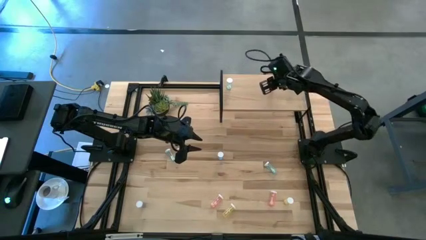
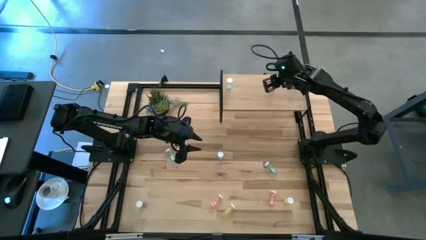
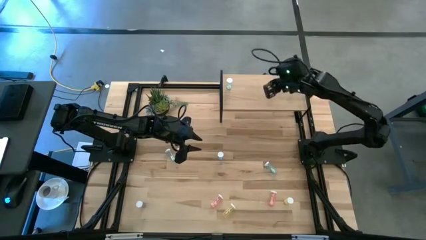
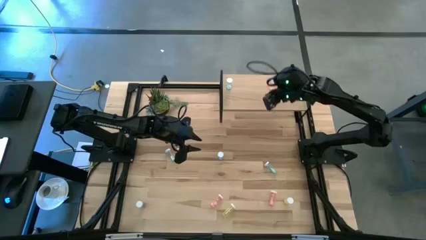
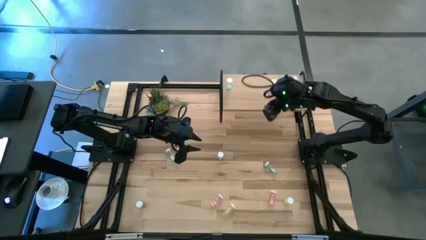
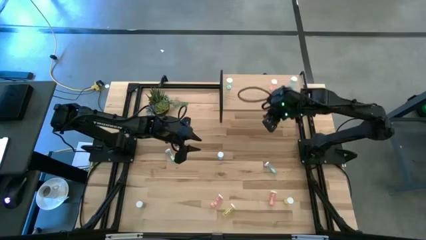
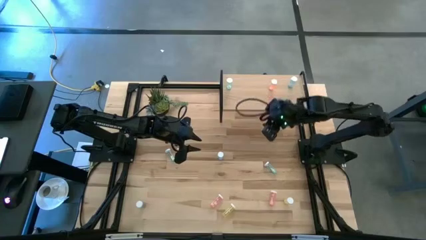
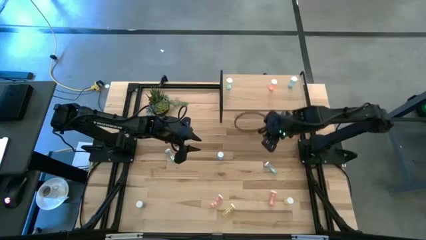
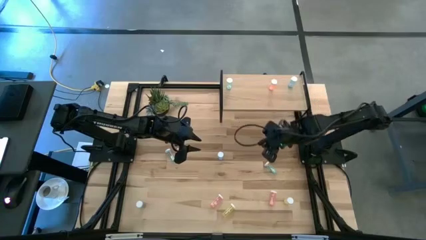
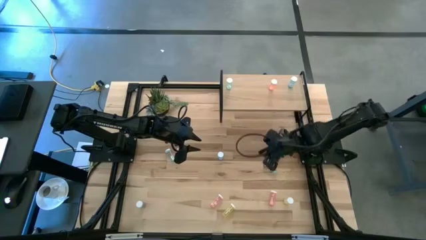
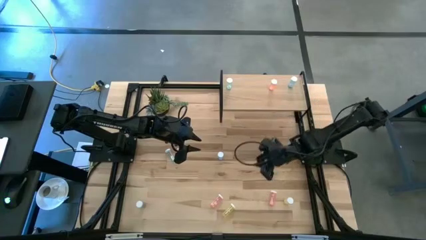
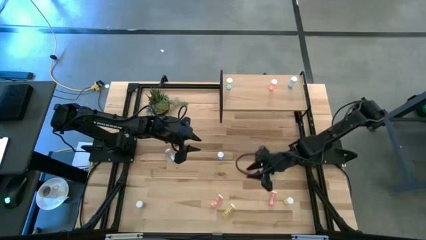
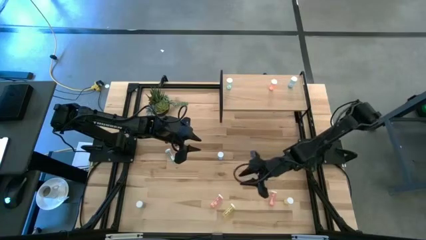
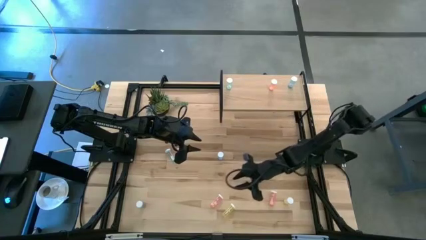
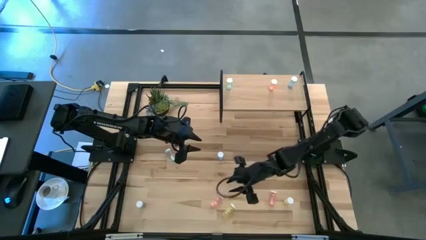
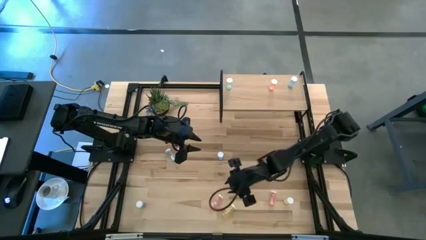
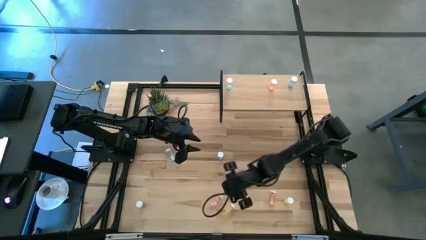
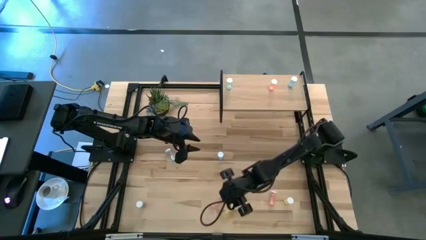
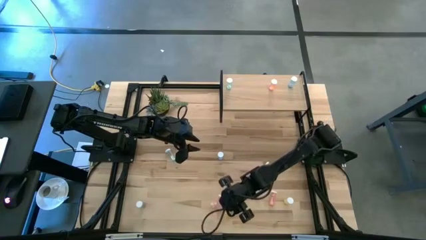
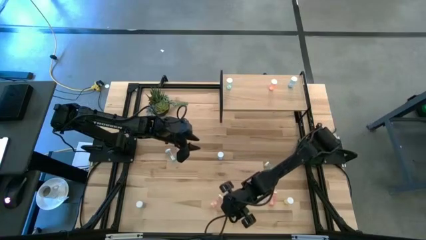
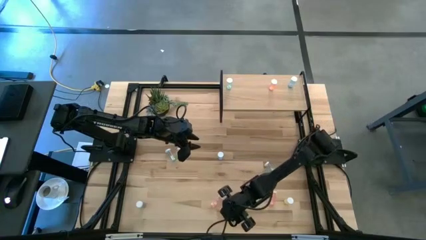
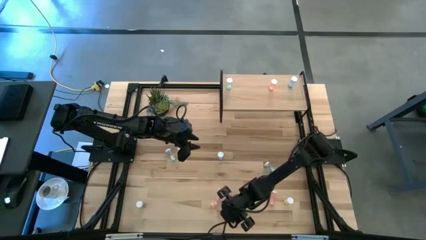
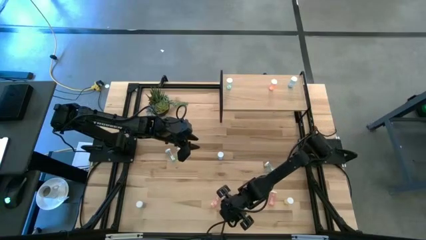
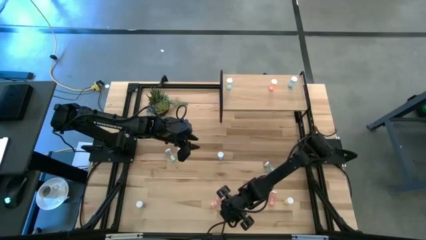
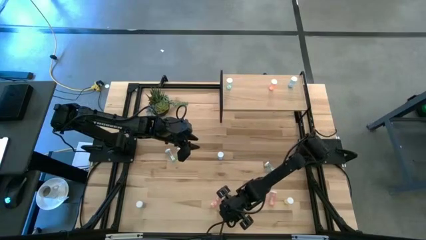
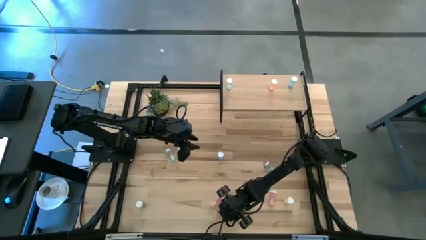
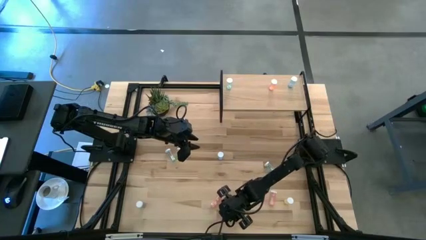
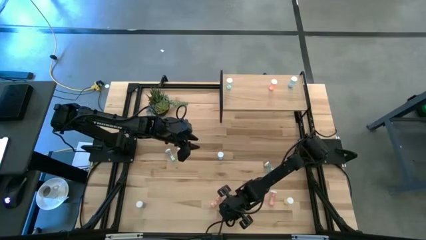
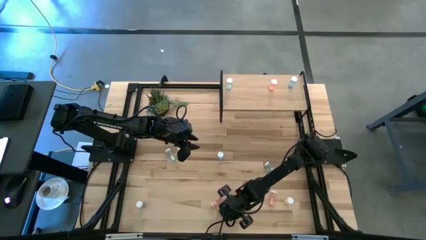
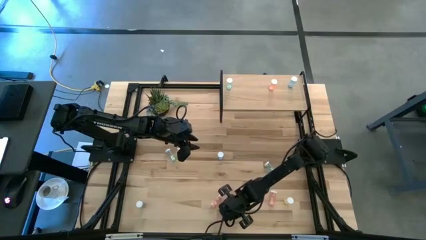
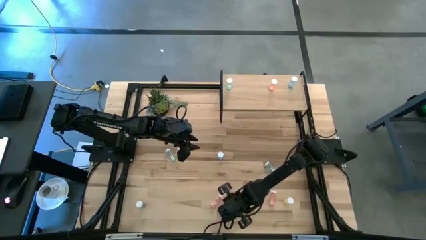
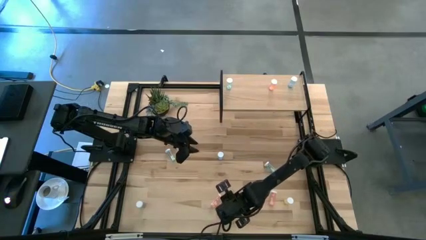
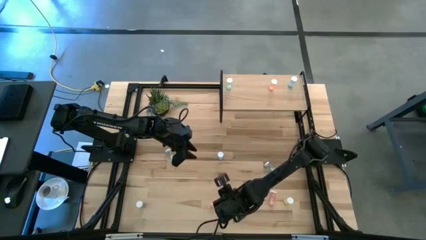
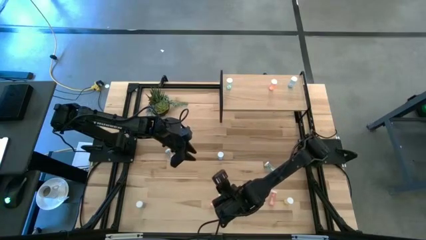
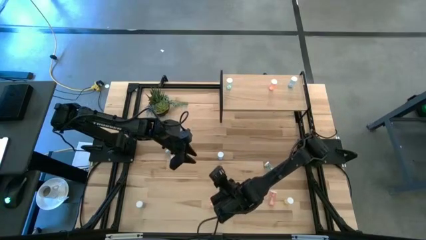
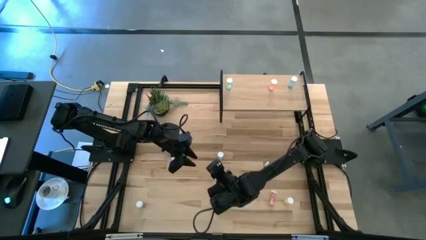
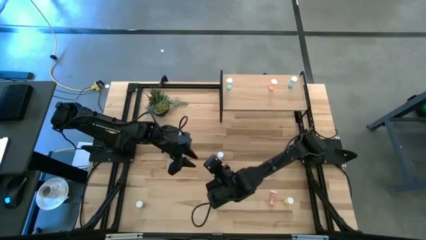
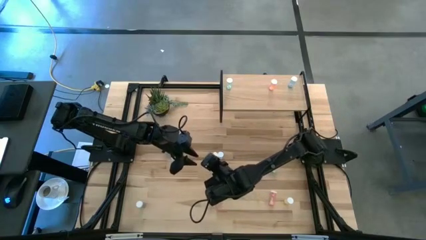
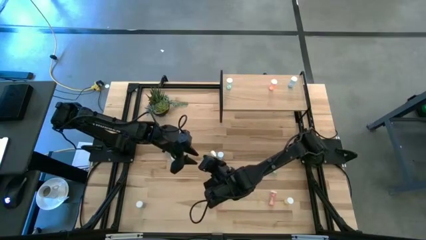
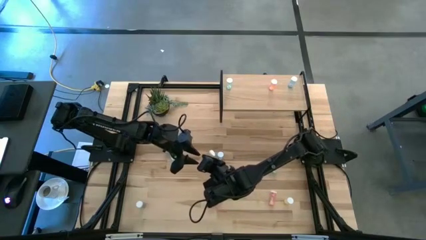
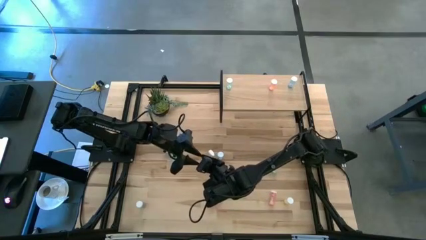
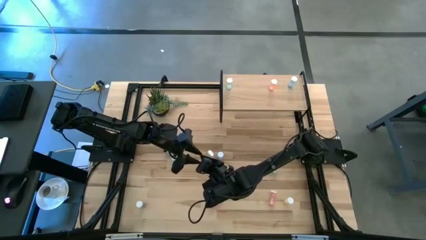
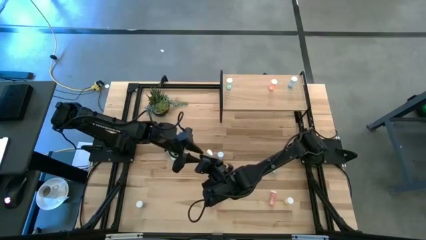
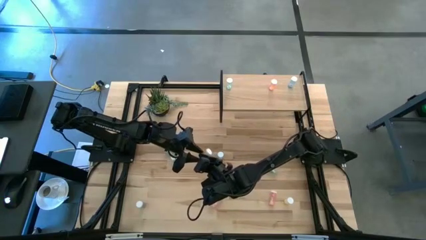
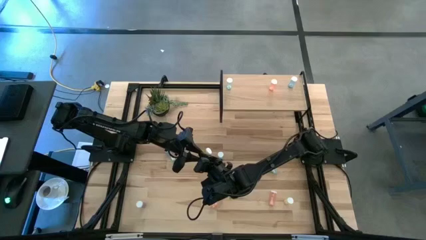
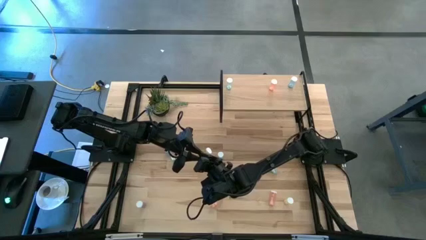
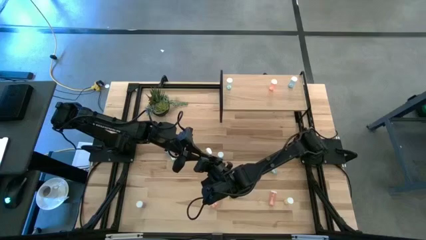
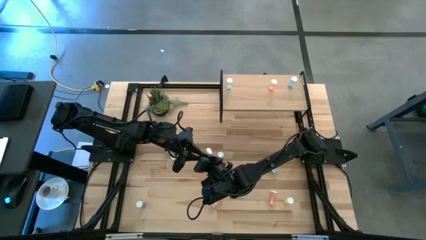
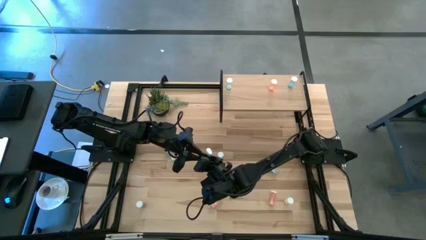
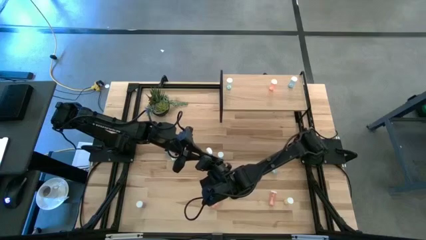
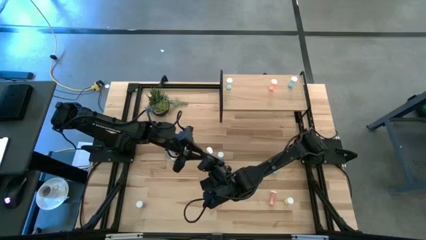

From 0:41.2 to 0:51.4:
Task: Pick and place medicine bottles onto shelf by color
Put the yellow pill bottle on the shelf
